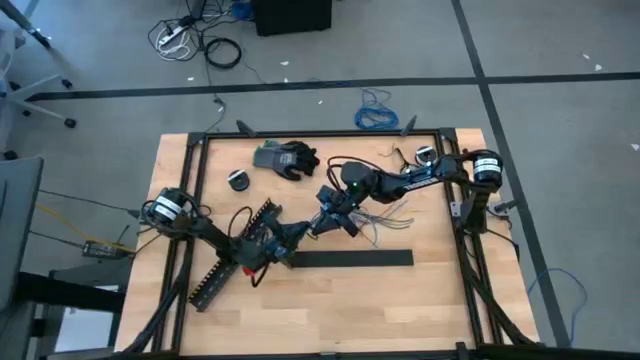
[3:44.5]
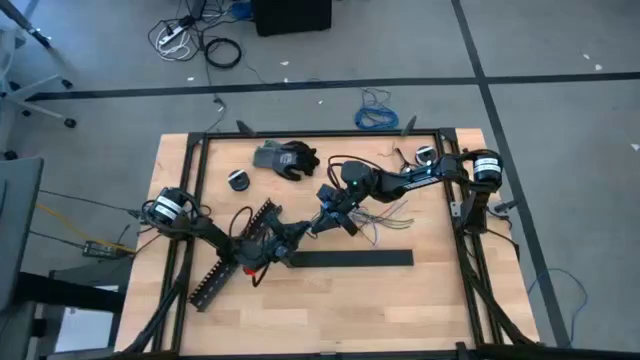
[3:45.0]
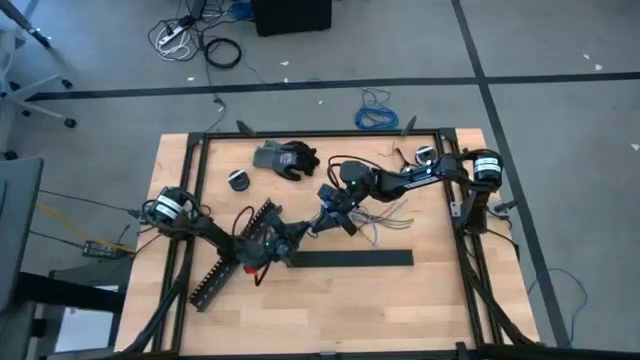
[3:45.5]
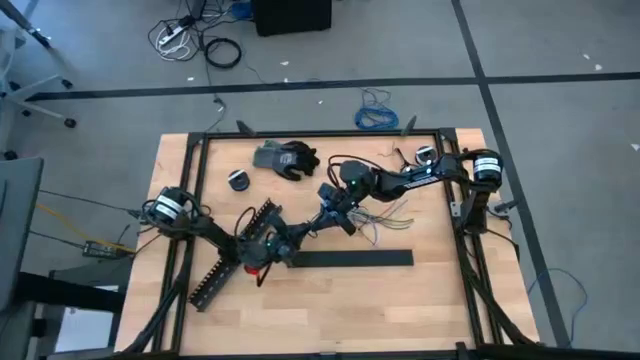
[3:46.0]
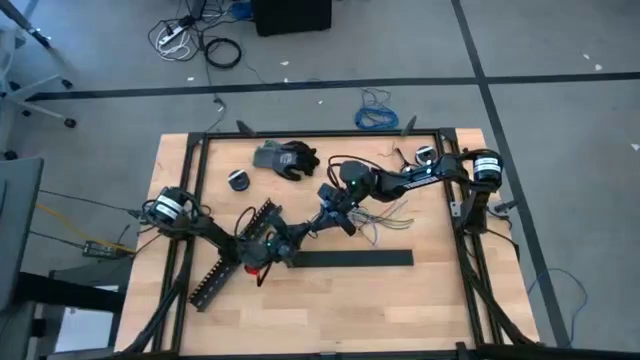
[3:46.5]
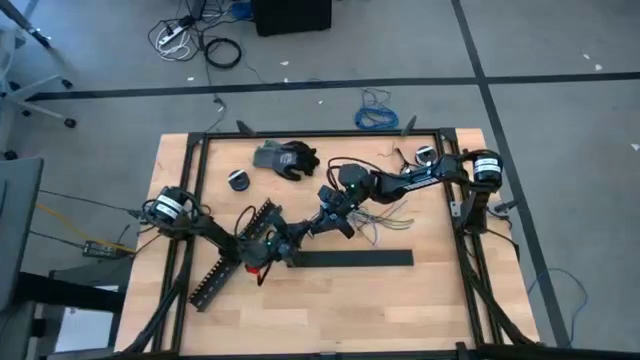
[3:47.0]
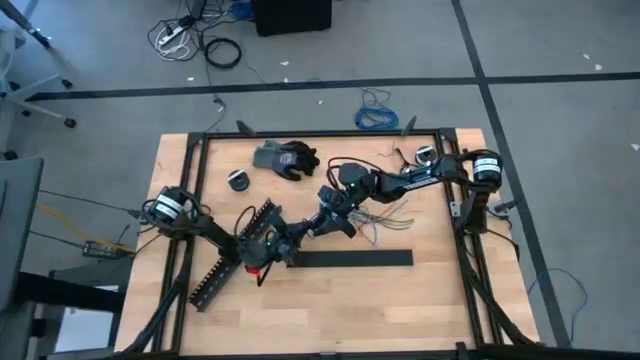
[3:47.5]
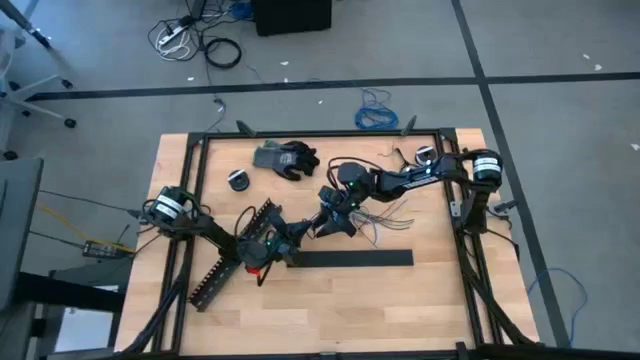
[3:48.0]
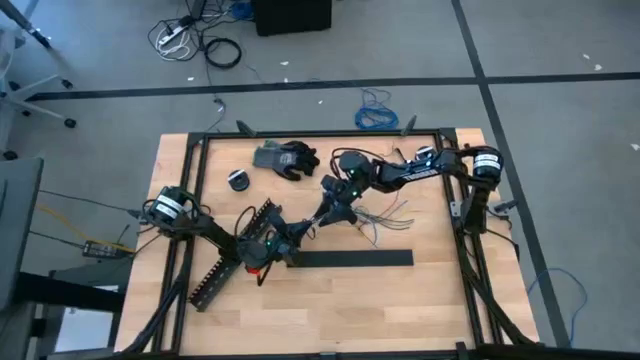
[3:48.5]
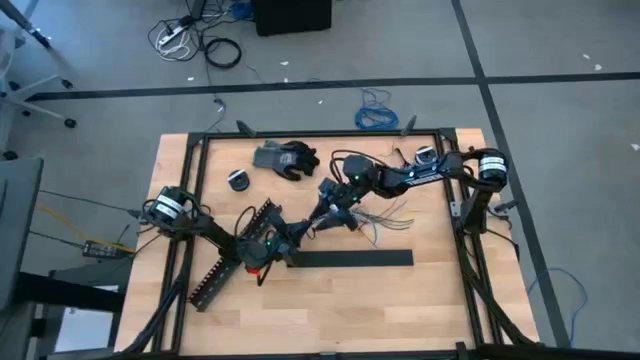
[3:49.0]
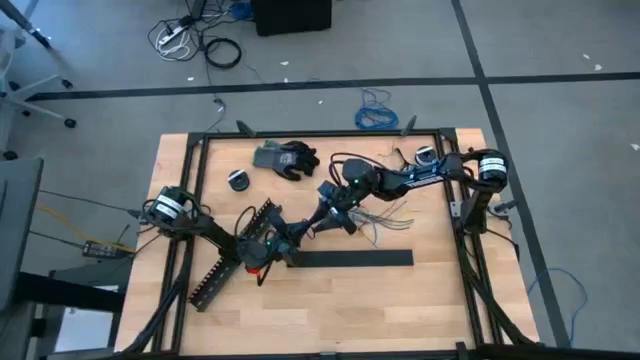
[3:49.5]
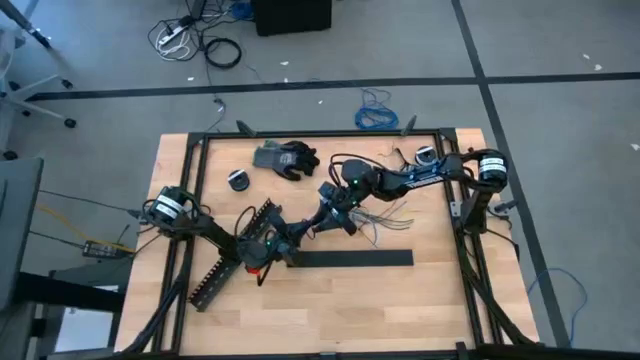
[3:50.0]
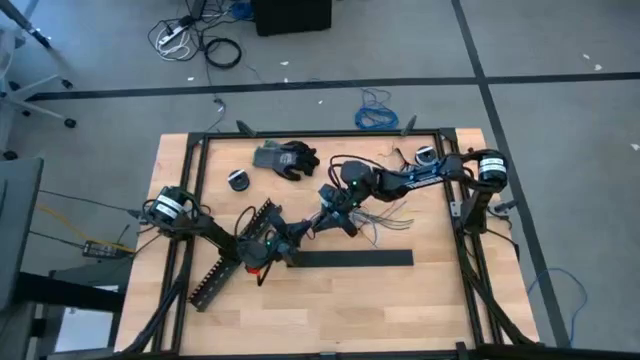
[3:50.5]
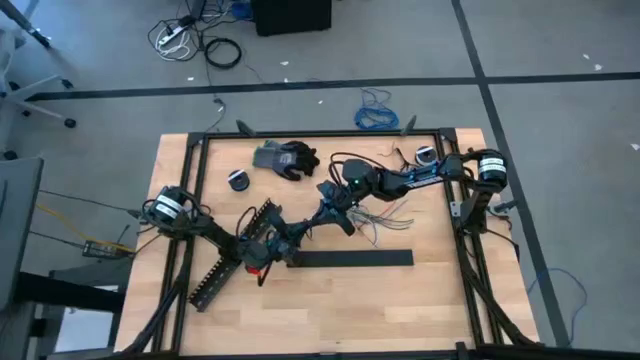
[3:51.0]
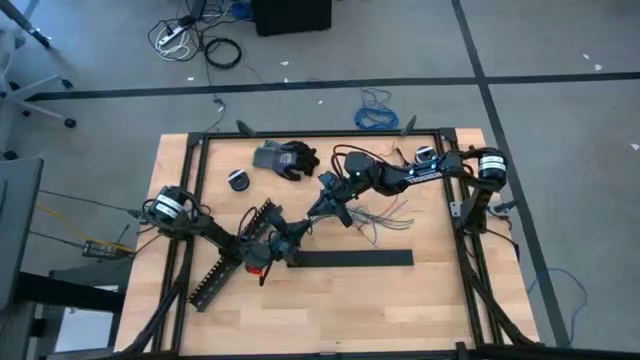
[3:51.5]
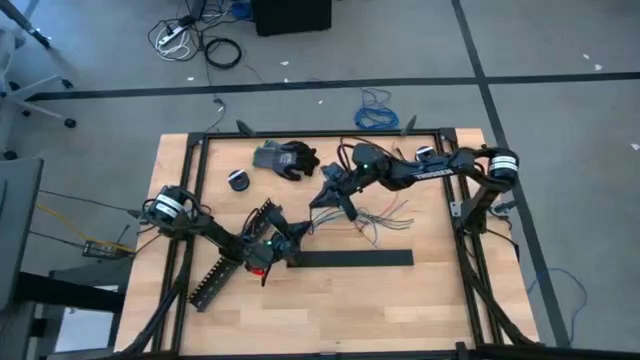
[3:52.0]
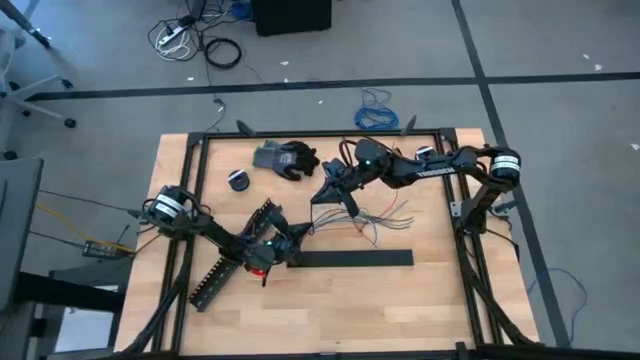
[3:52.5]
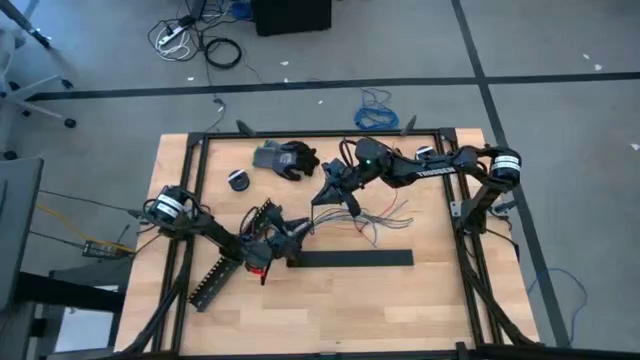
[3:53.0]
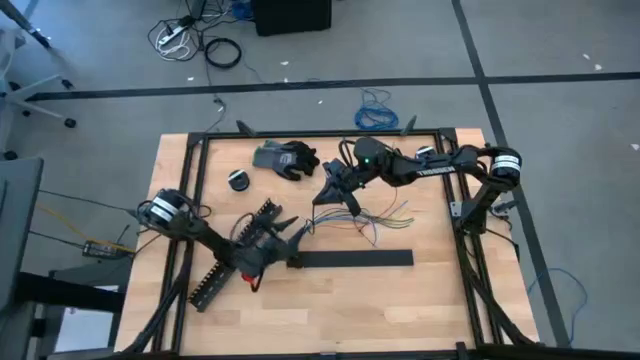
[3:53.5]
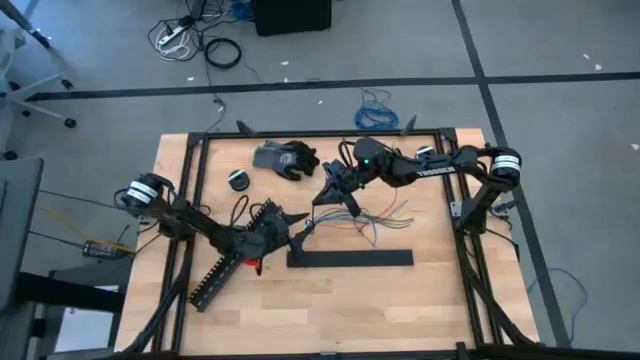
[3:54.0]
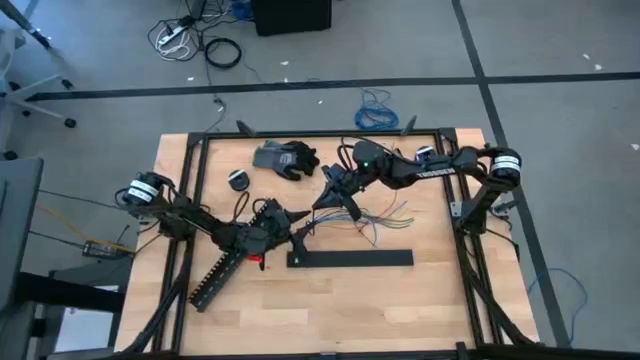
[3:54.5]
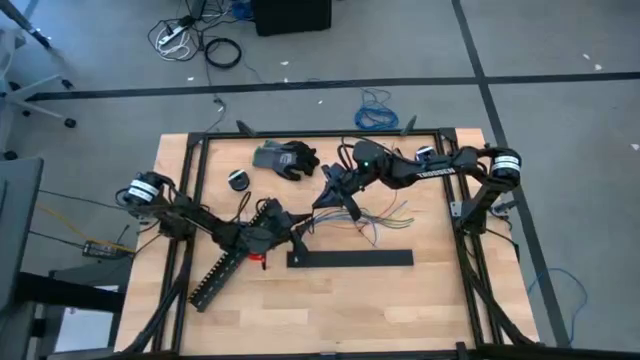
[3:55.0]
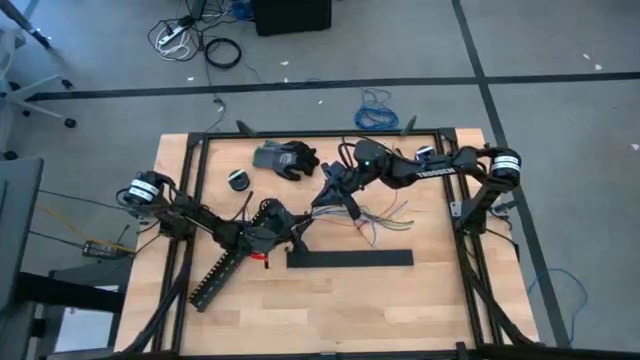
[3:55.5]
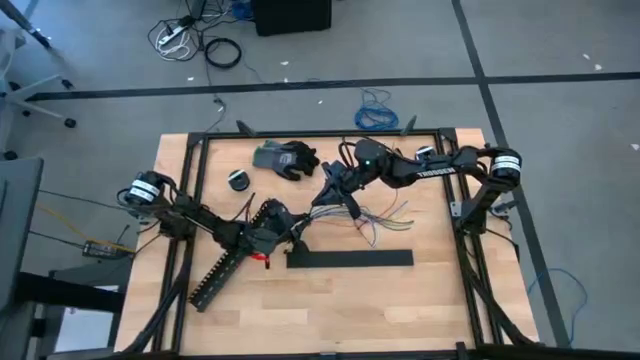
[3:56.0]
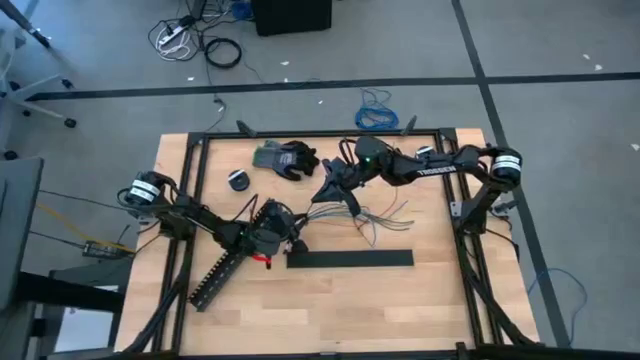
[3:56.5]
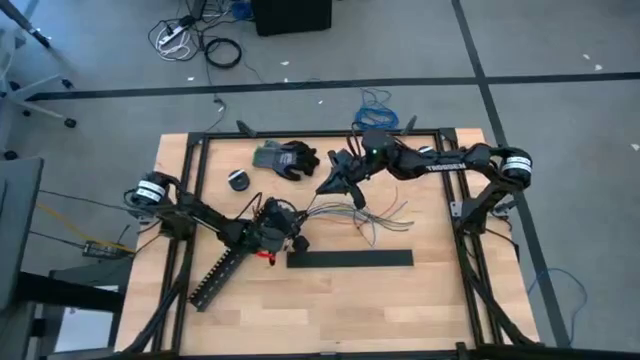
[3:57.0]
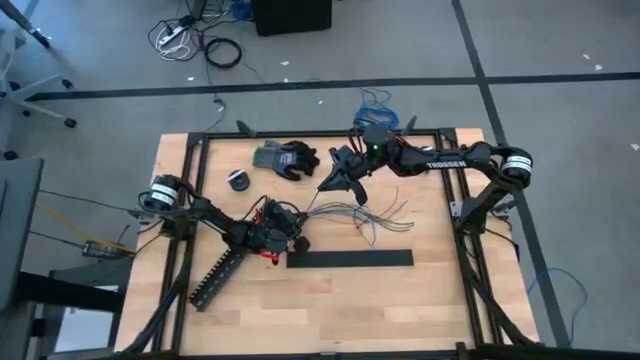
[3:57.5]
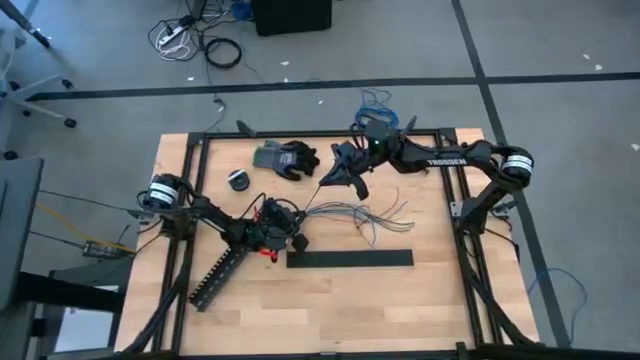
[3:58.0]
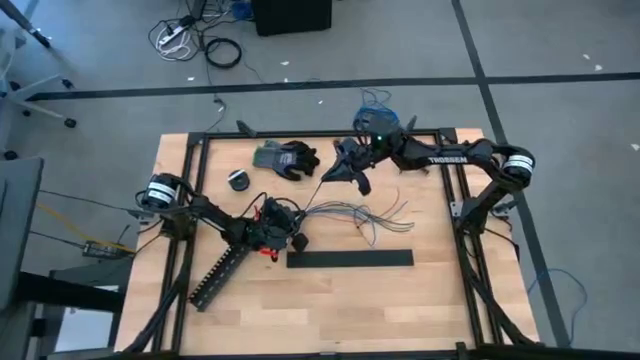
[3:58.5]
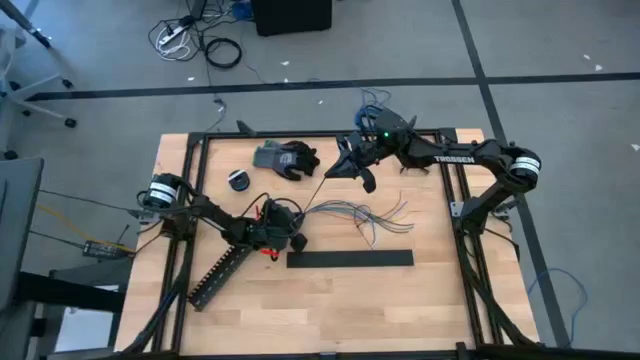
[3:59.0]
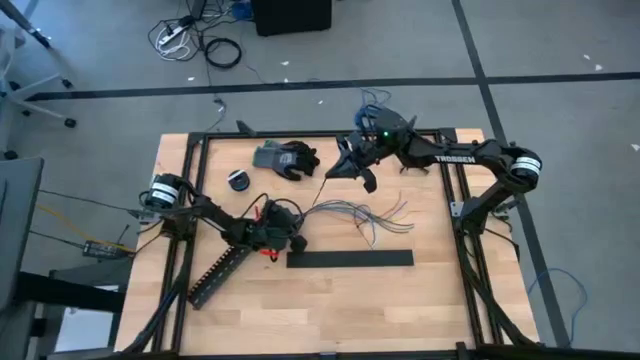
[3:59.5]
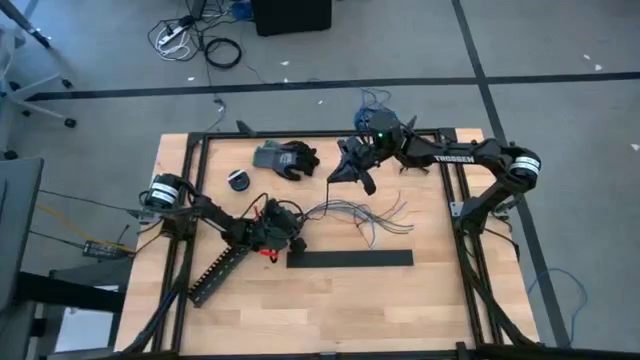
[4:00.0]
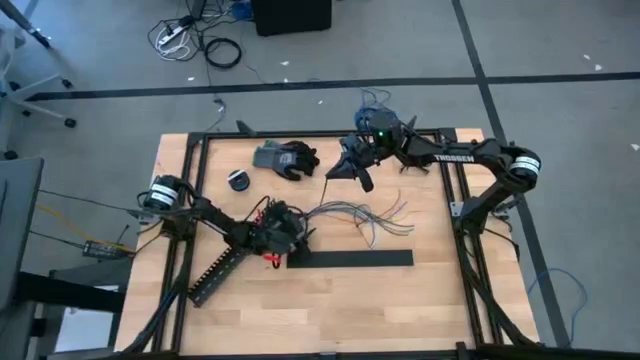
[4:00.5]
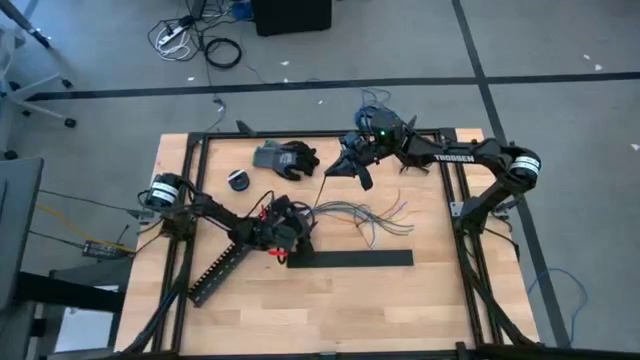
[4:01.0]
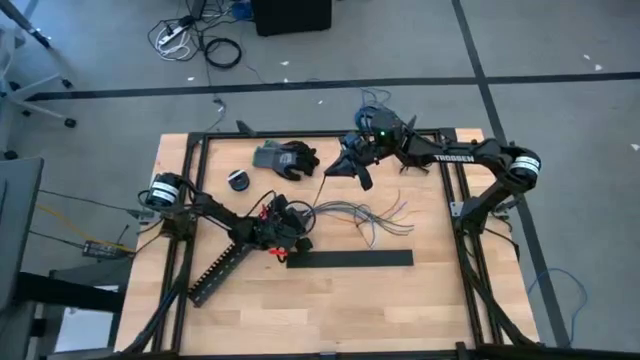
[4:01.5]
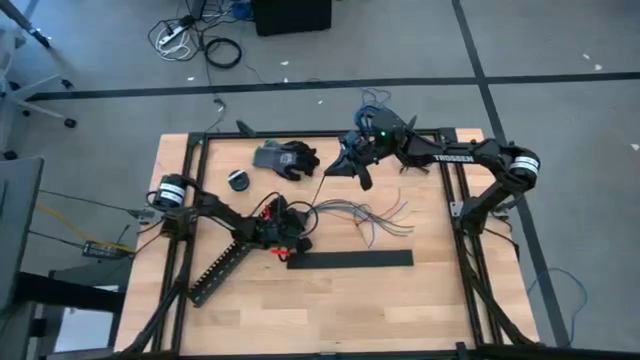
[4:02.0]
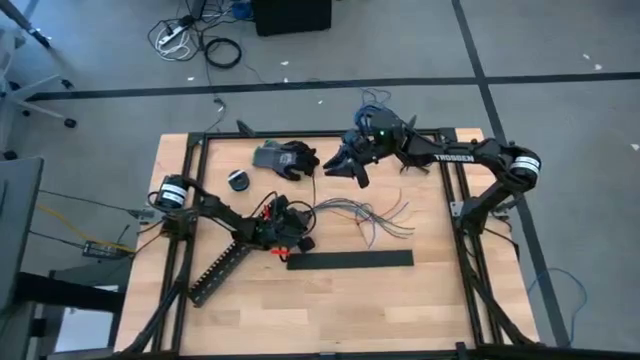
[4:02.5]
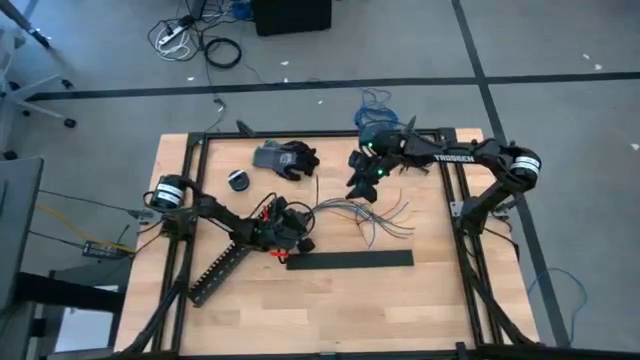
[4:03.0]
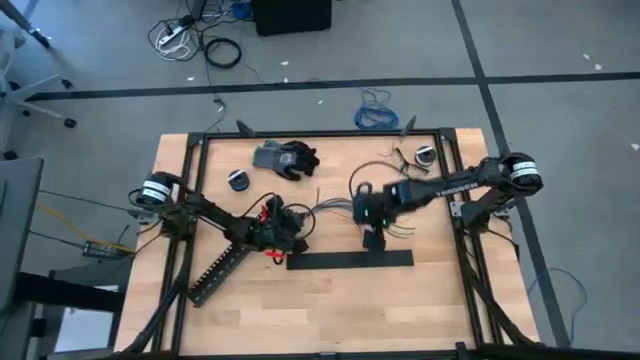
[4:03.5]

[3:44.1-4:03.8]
Task: Ziptie cables
Wrap the other black zip tie on the cable wires
